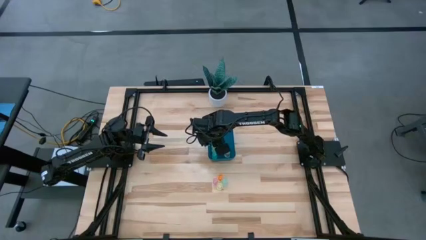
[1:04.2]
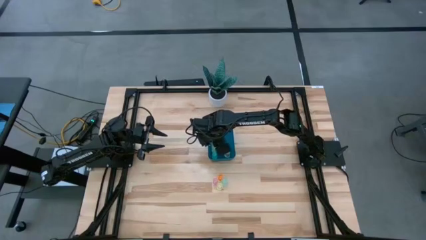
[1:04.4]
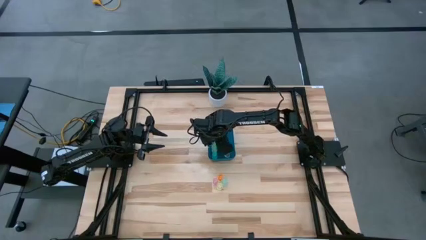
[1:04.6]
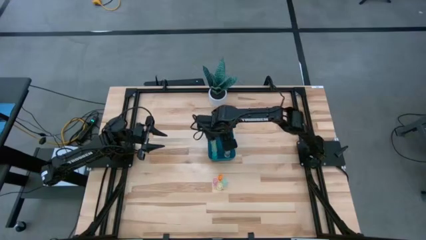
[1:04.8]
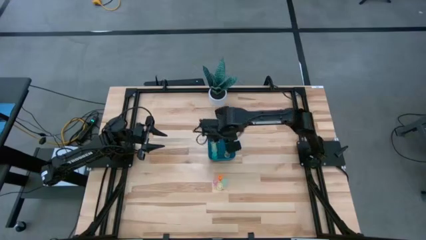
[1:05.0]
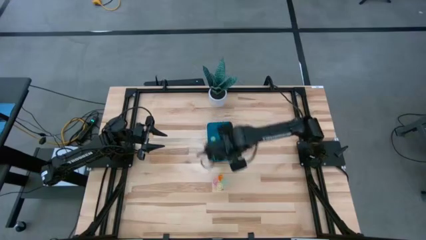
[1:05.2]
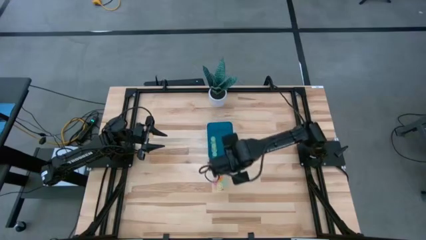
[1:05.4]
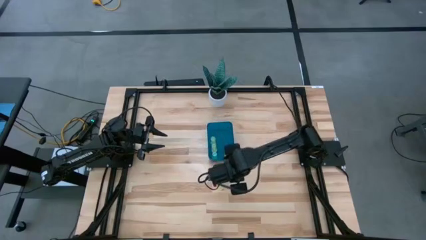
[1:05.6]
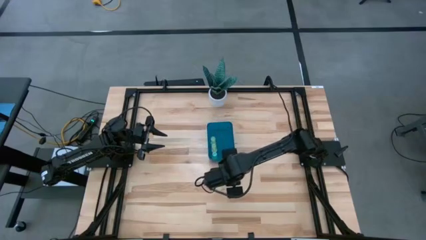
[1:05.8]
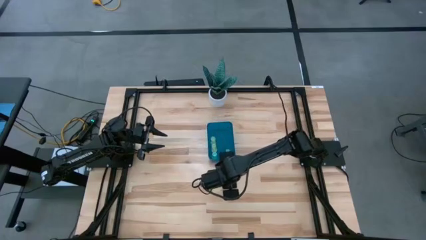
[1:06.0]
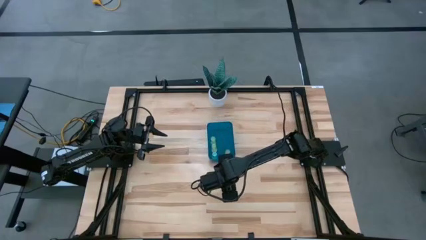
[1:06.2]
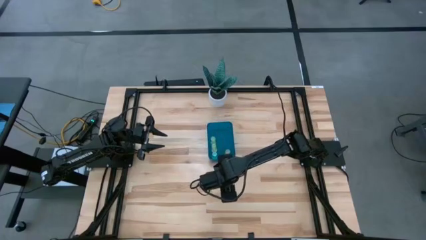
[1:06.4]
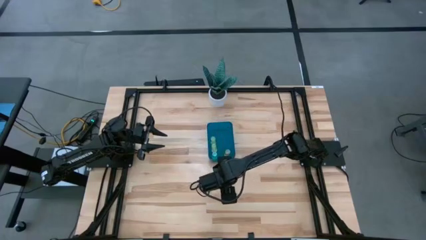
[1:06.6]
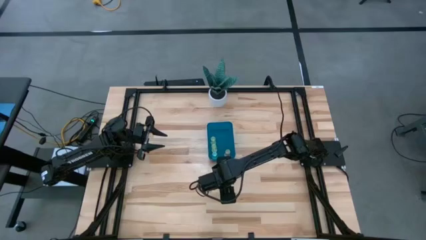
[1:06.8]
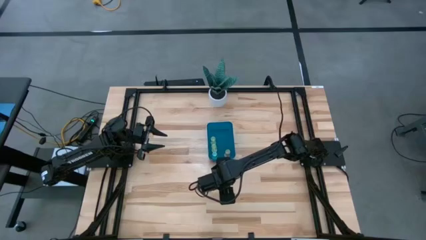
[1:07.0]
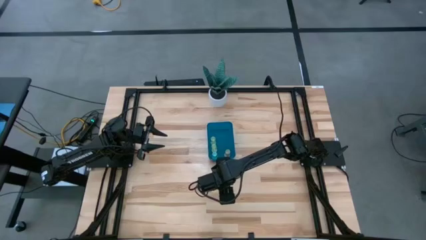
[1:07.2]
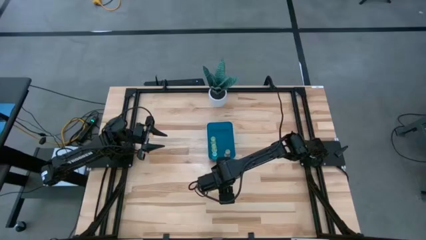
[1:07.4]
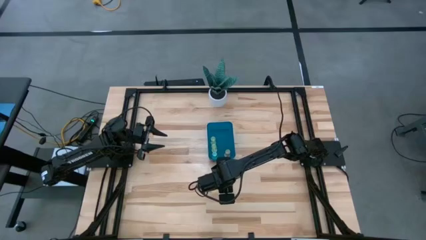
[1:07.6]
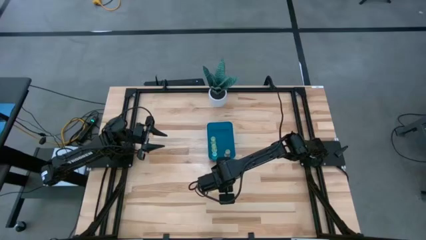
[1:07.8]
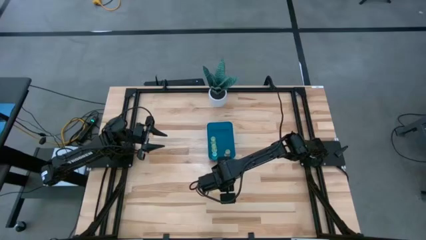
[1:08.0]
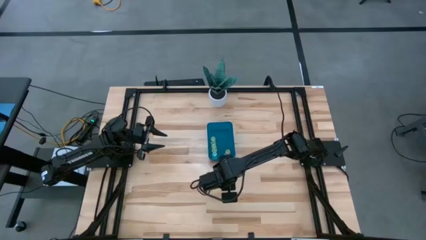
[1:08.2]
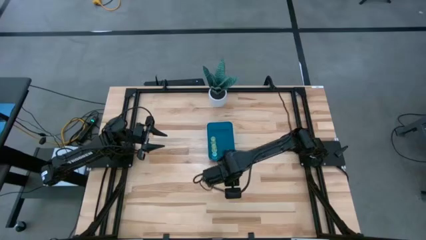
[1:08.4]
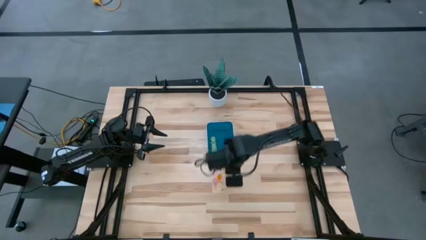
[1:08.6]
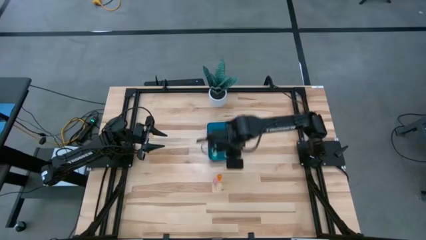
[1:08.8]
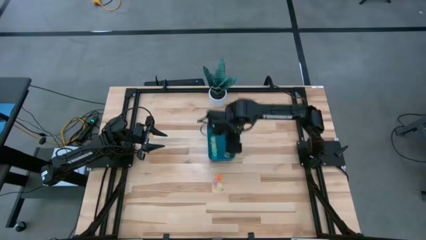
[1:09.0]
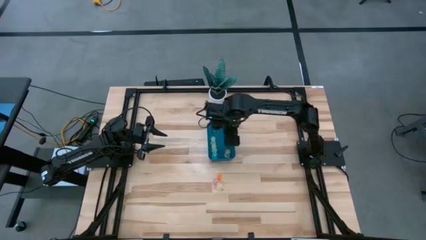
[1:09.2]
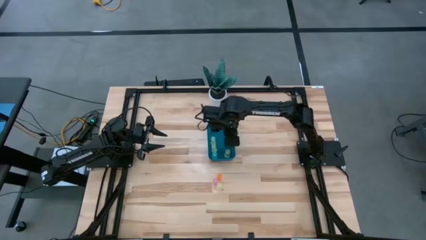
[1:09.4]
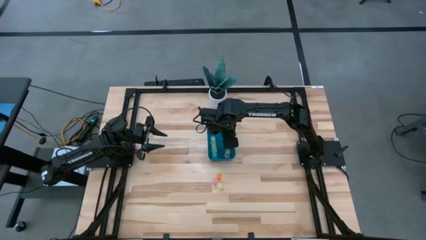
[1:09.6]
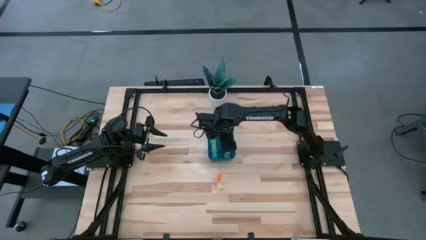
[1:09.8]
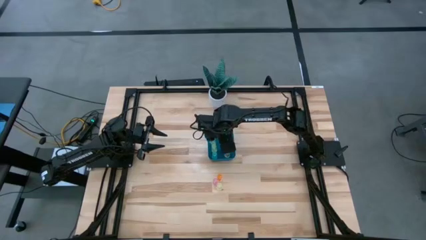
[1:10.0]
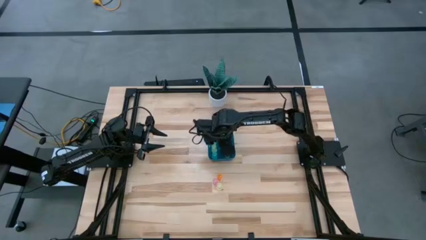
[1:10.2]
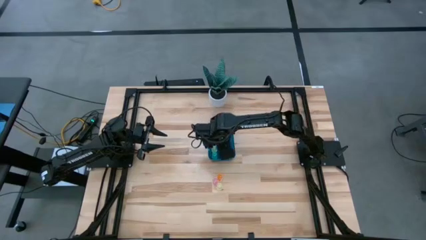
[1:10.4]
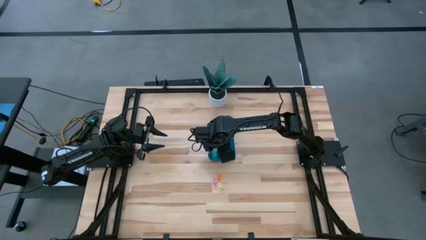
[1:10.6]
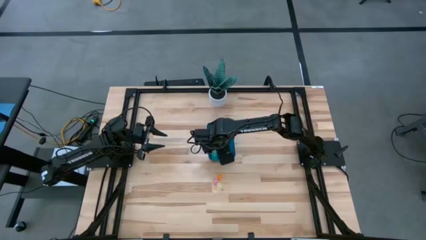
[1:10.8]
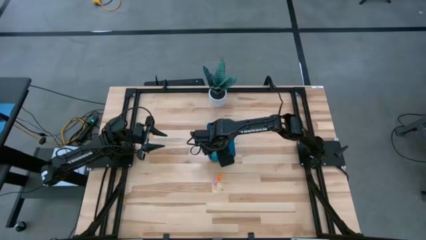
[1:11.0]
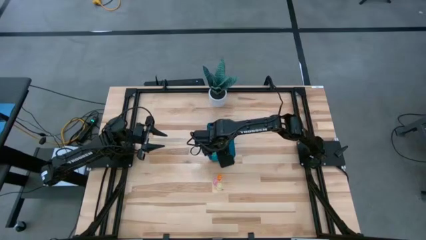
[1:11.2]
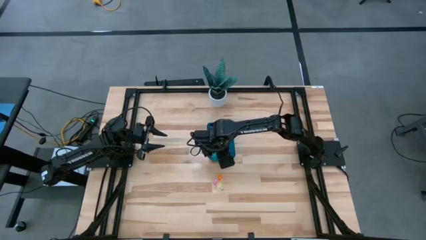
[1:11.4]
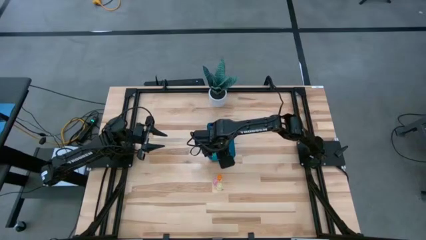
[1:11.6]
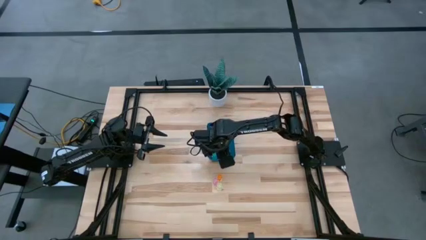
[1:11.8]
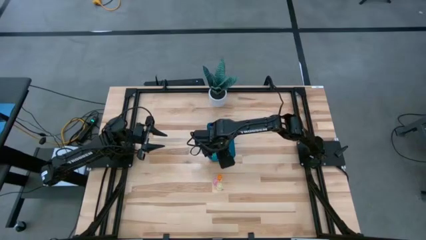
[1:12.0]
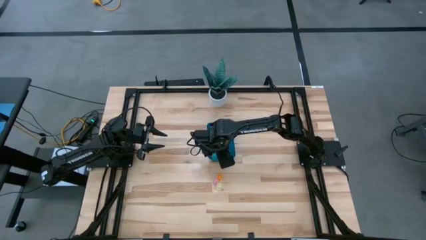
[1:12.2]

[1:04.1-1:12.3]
Task: Pick and place pill bottles into a basket
Put the blue pill bottle into the blue container

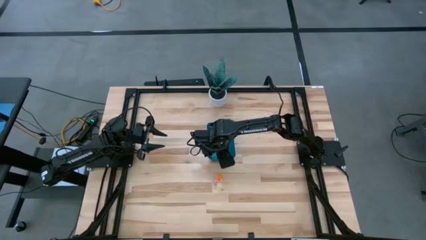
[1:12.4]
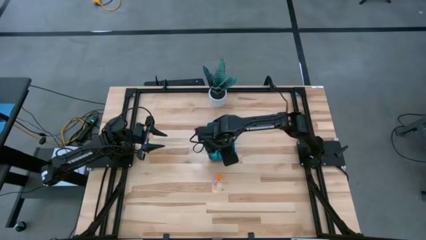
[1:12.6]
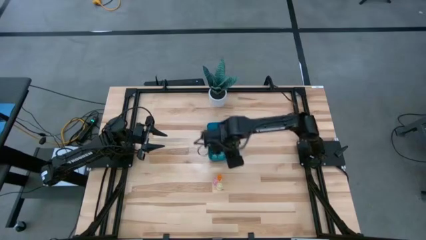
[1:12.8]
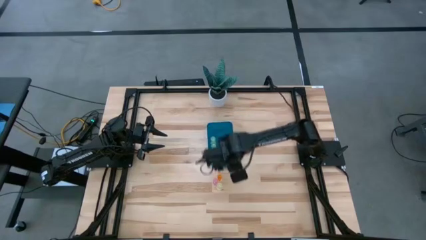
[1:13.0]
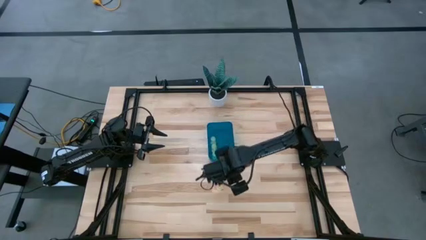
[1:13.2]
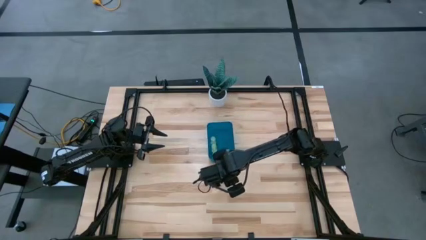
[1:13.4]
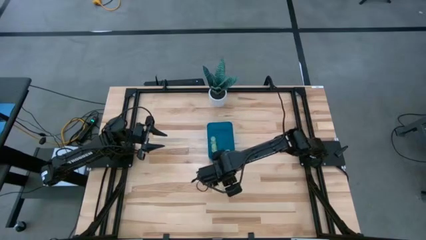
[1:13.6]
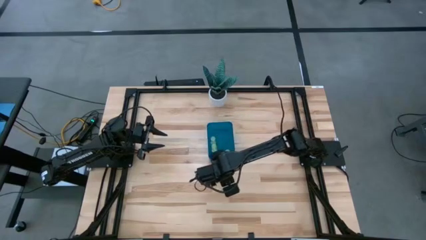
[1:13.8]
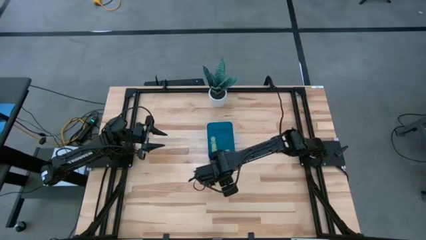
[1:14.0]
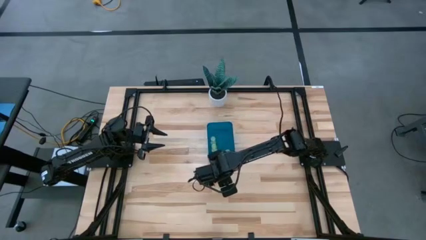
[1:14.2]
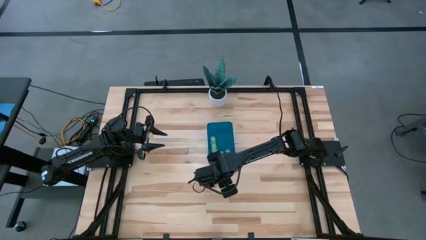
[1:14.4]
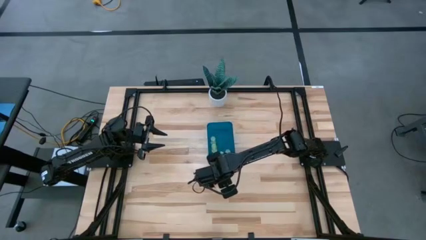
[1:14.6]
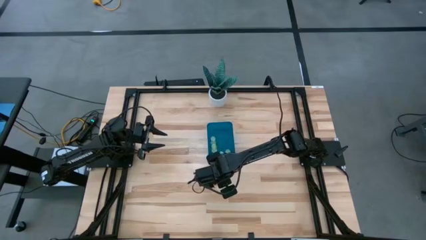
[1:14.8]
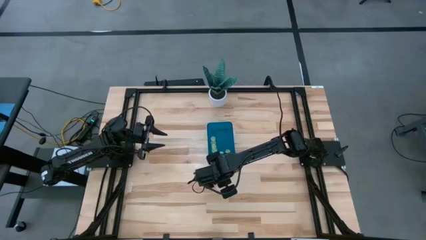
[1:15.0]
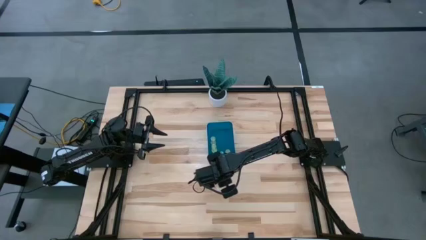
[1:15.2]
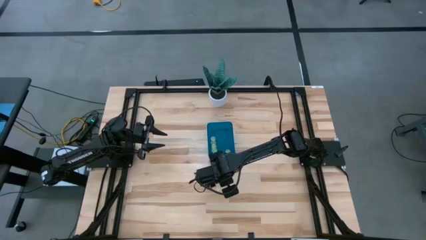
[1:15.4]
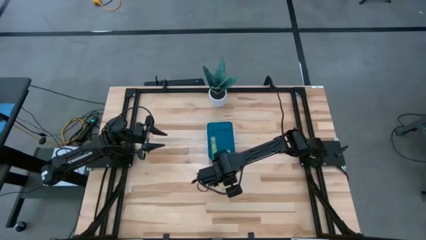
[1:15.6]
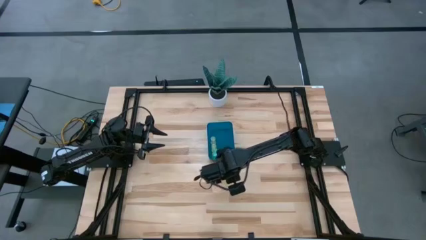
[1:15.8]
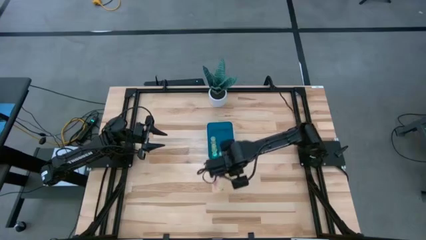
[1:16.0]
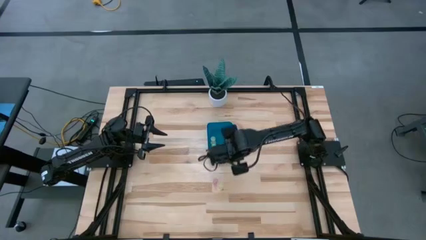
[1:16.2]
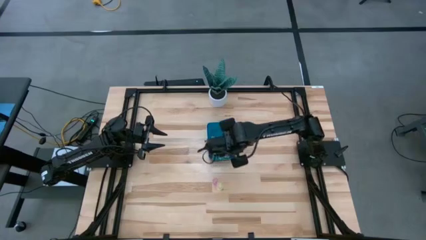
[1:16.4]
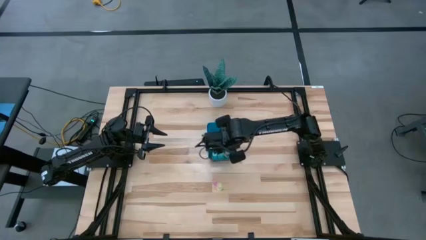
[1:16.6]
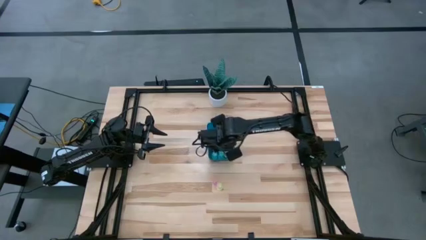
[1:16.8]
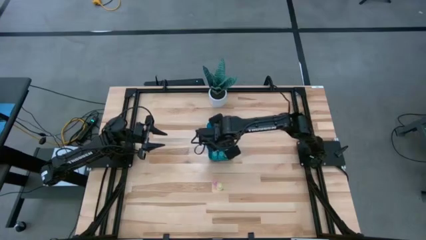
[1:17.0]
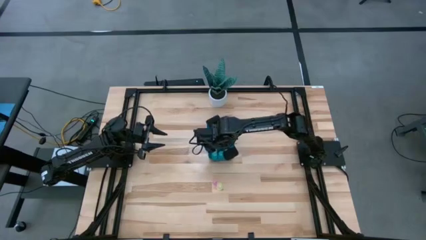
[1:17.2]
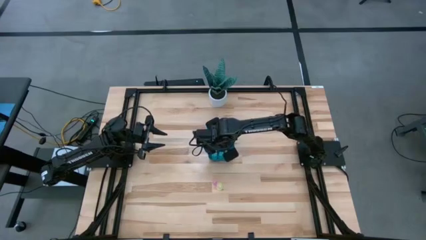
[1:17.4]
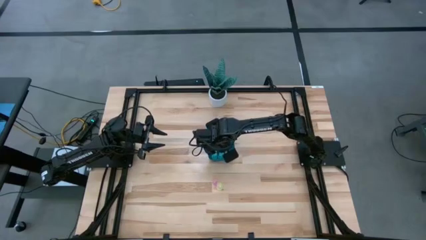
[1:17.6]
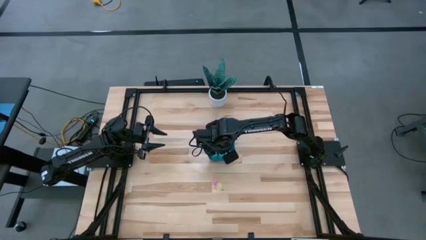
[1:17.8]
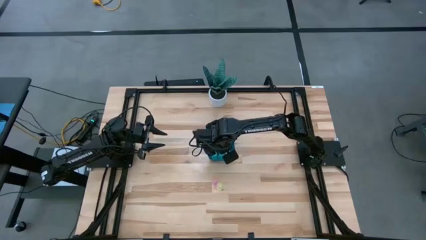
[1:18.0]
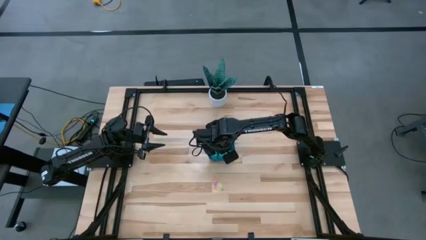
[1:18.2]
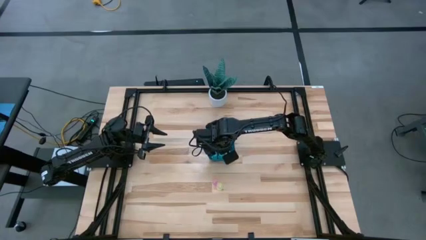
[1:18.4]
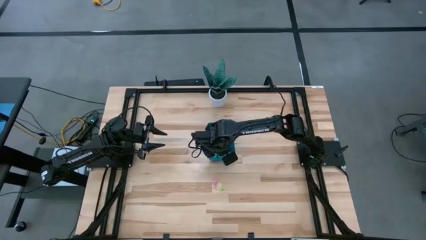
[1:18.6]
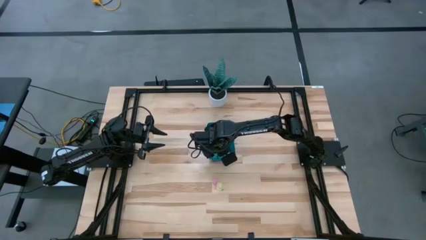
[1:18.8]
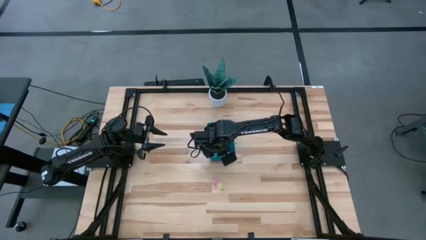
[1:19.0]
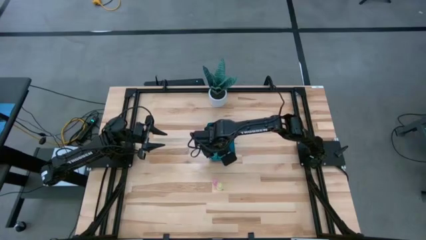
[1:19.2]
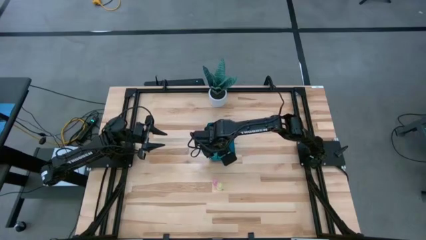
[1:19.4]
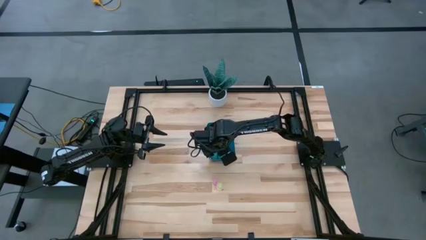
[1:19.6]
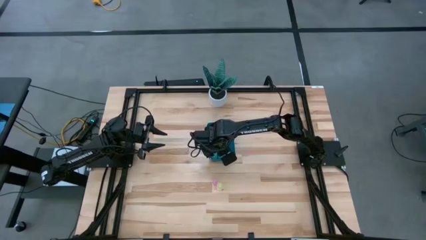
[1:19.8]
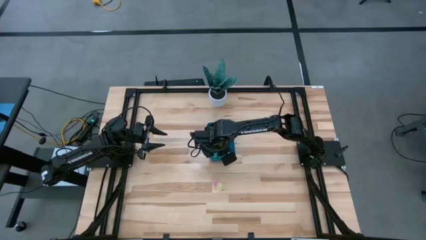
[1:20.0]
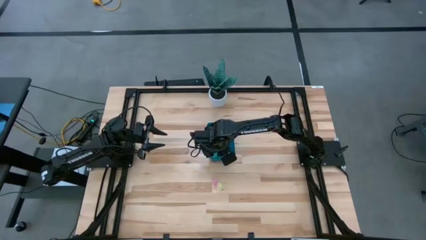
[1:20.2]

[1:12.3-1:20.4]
Put the orange pill bottle into the blue container
